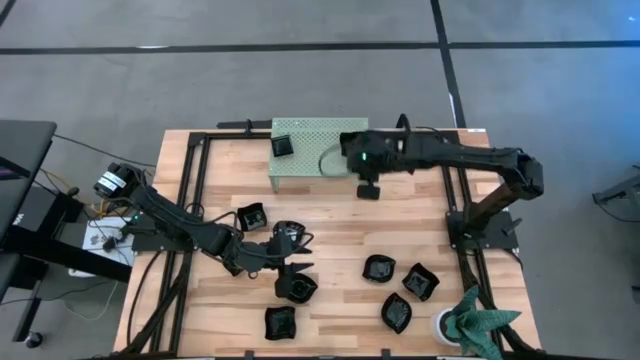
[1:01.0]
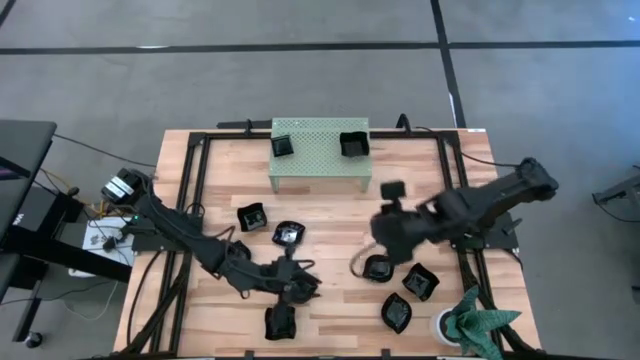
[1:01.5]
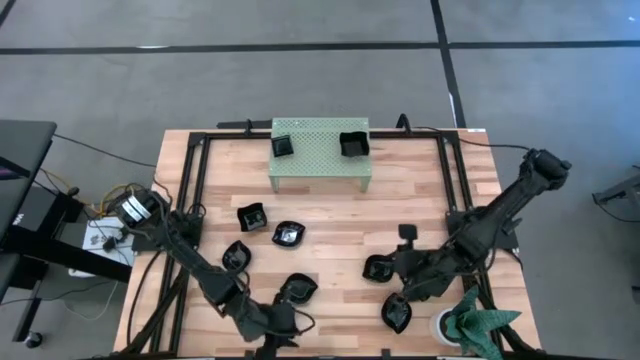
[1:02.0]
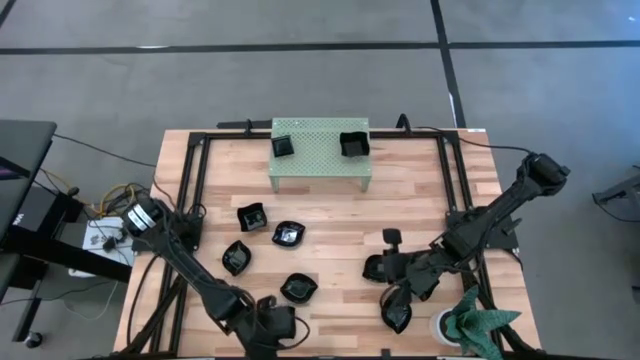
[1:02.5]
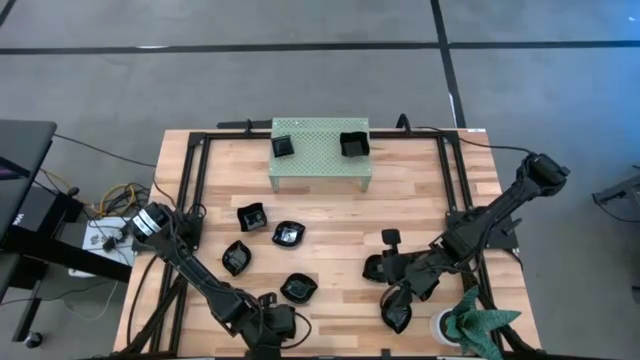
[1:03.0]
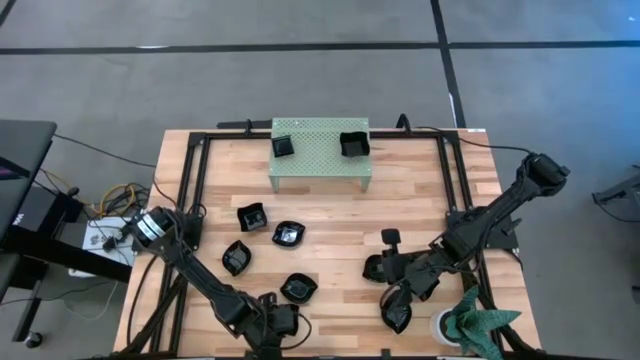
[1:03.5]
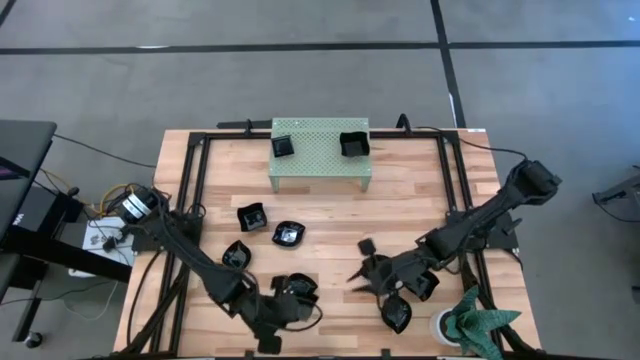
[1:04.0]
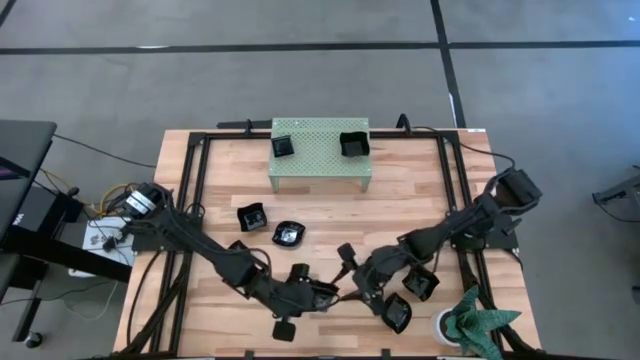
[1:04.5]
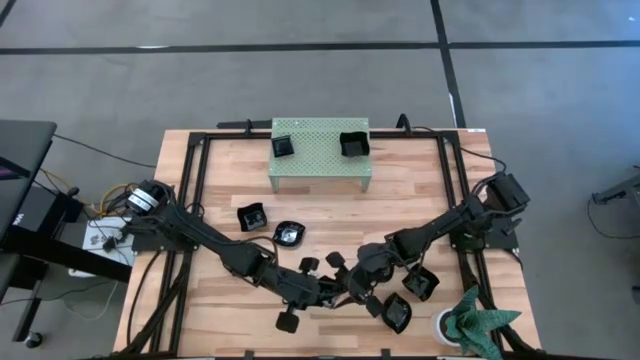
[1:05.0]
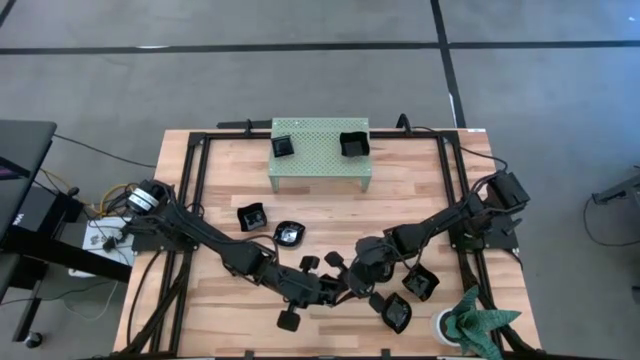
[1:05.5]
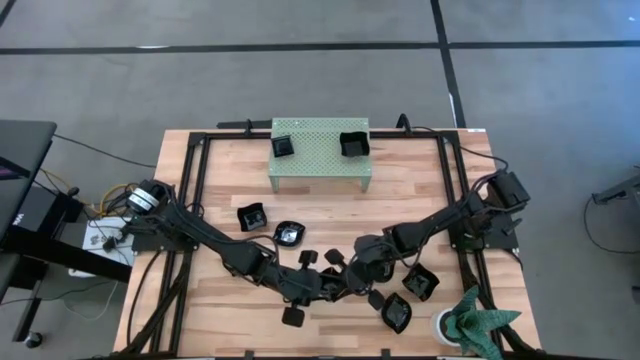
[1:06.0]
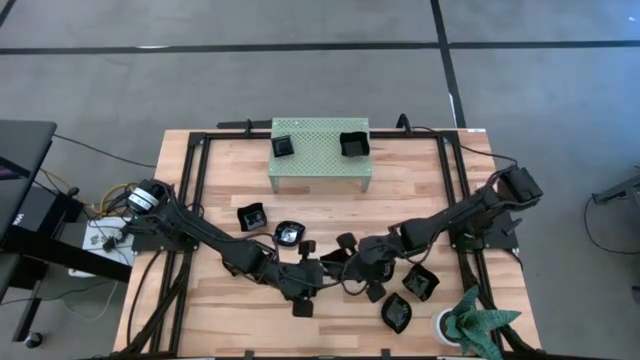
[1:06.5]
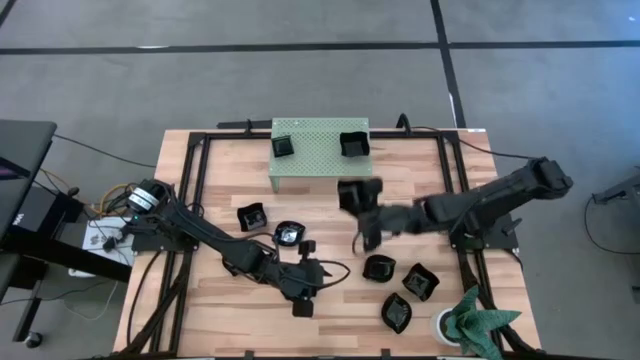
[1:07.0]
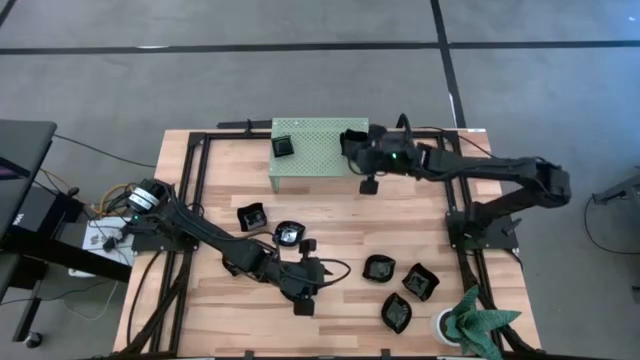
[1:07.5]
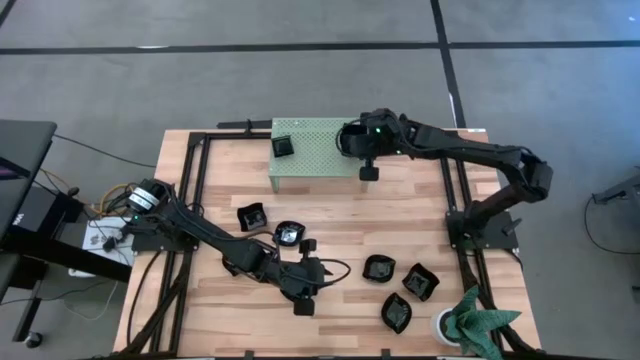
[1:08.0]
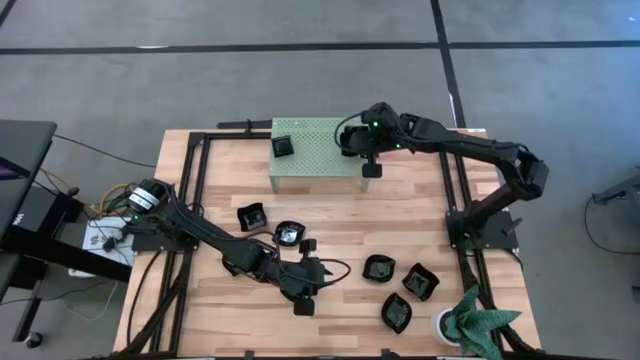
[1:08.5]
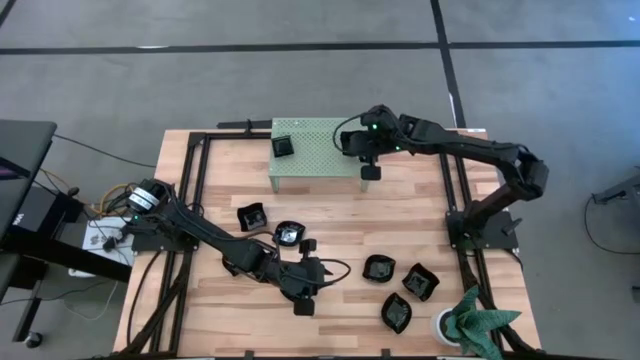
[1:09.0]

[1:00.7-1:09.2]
Task: Pick & Place Mini shaped plates
Stack the black distorted square plate on top of the black distorted square plate on the shelf

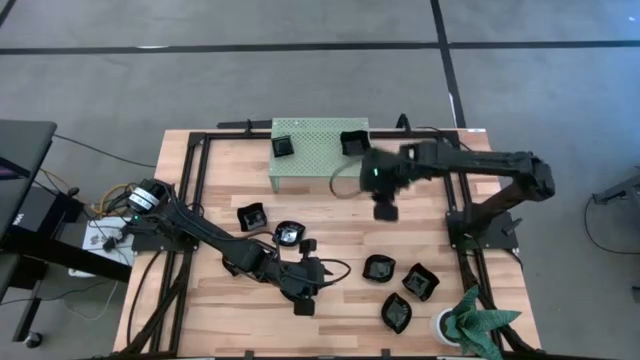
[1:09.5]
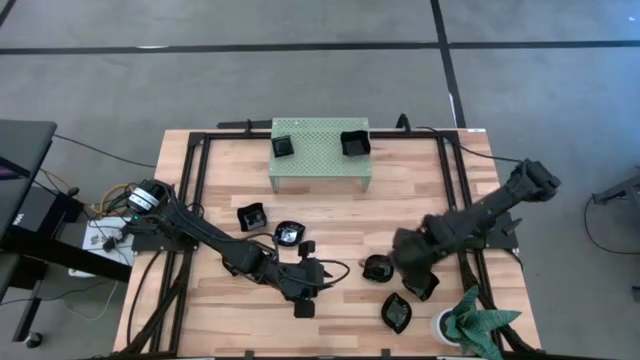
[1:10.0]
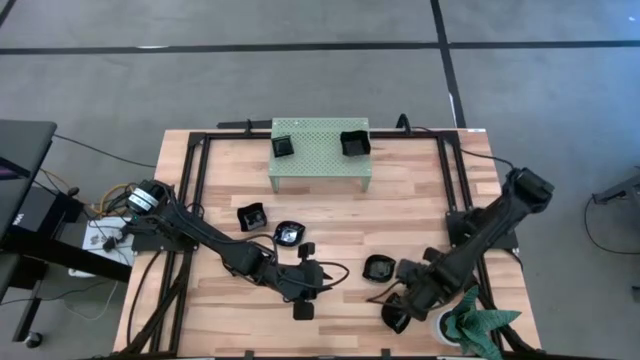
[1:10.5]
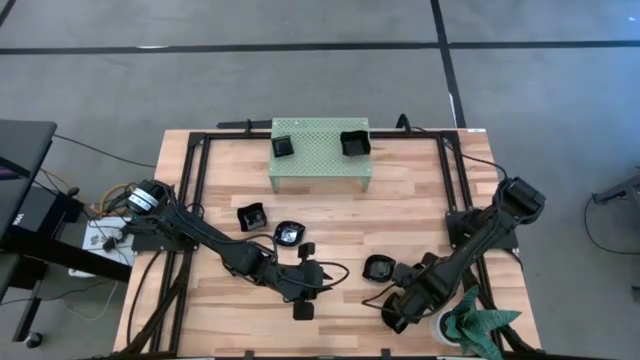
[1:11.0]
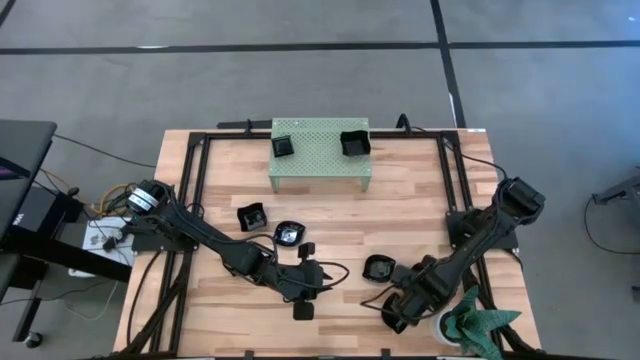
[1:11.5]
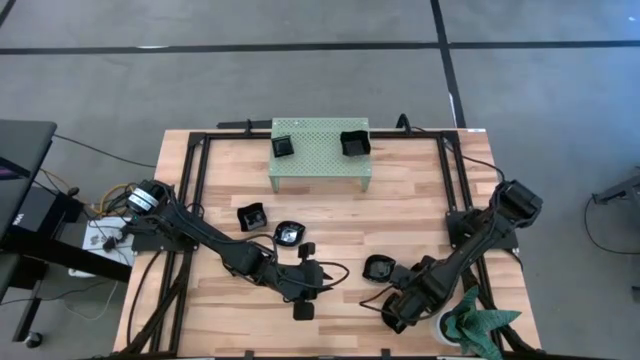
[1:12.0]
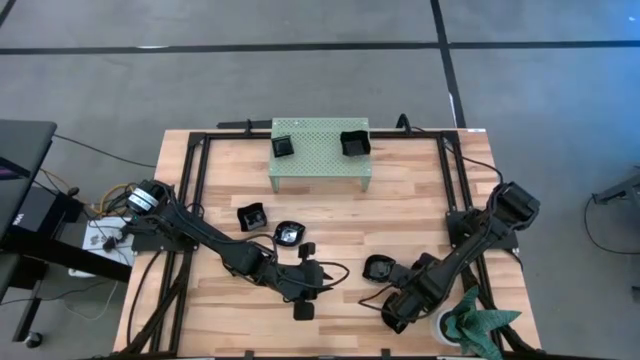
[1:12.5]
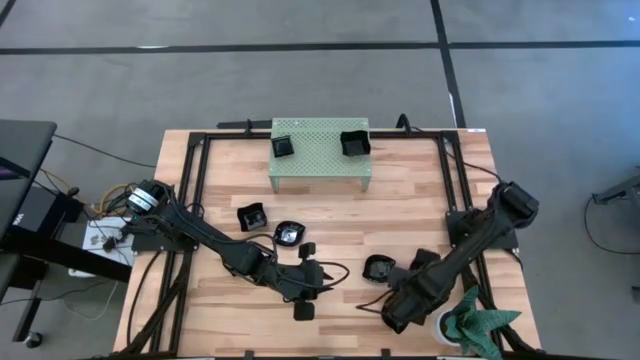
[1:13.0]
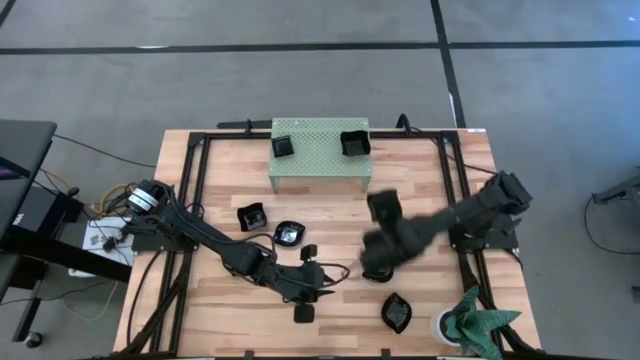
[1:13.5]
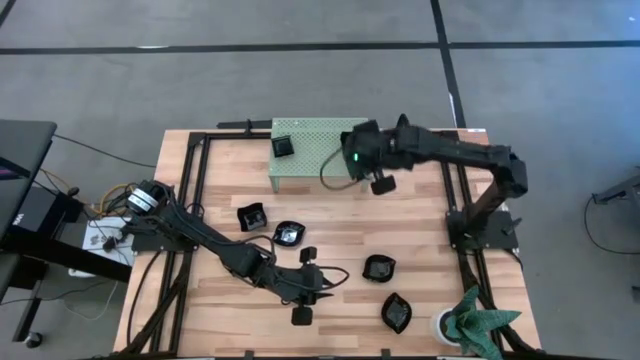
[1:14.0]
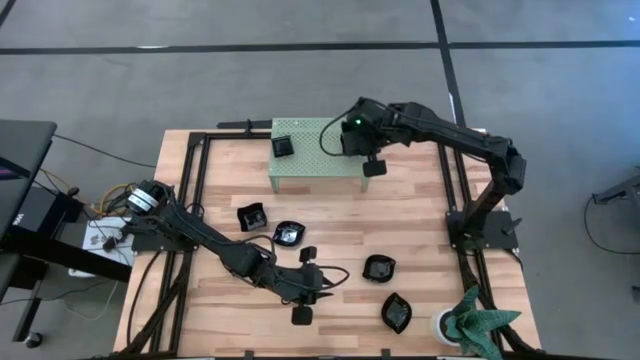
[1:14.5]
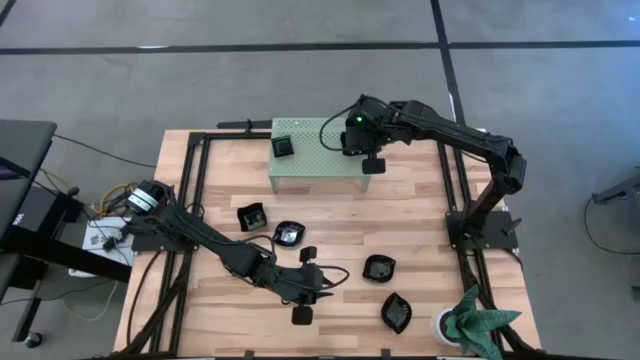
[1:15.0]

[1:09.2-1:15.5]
Stack the black distorted square plate on top of the black distorted square plate on the shelf

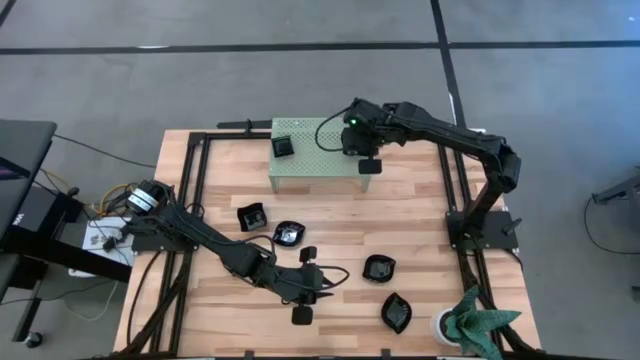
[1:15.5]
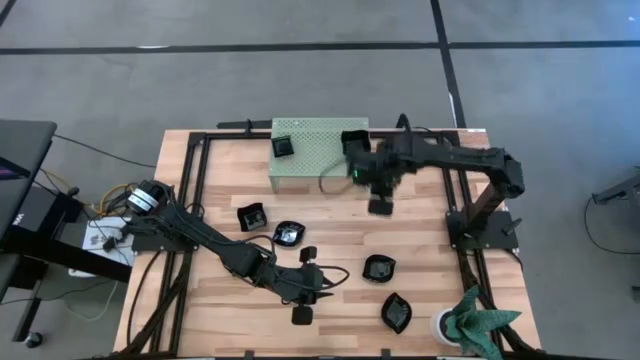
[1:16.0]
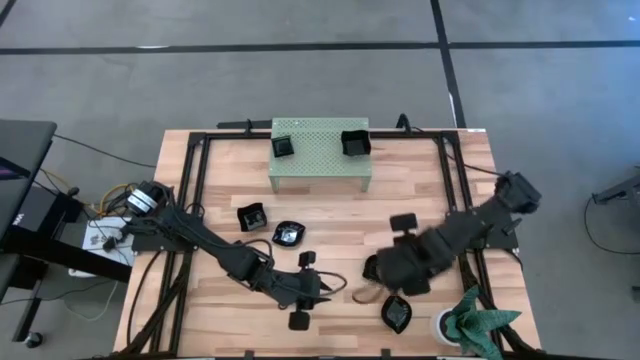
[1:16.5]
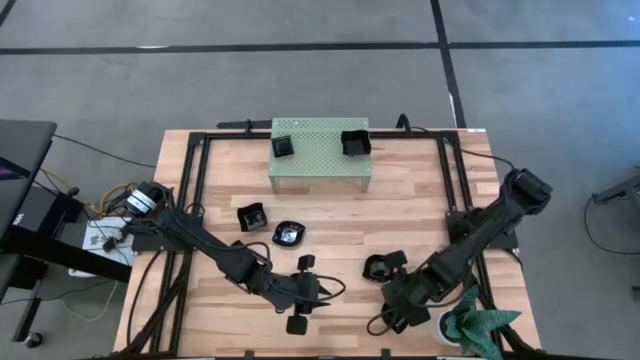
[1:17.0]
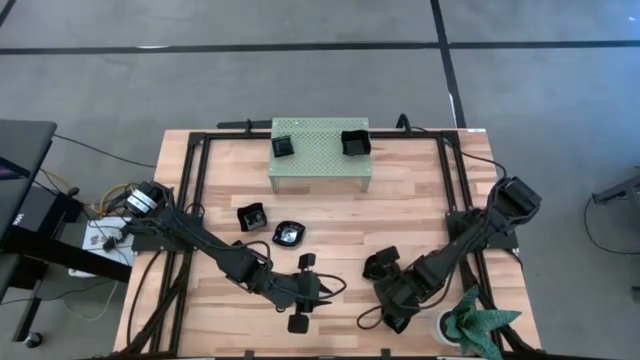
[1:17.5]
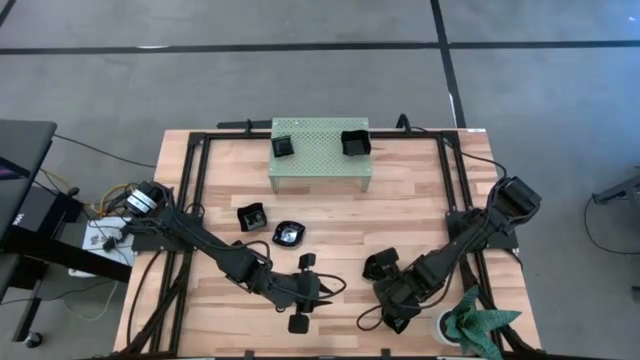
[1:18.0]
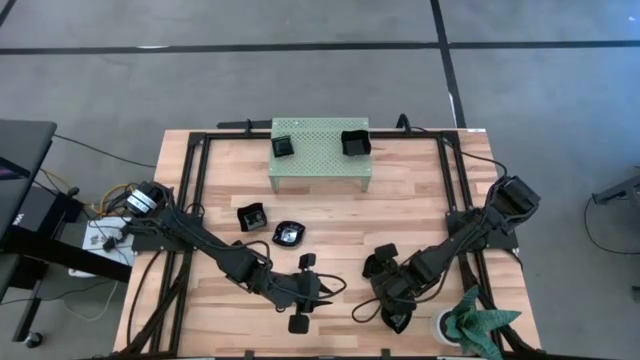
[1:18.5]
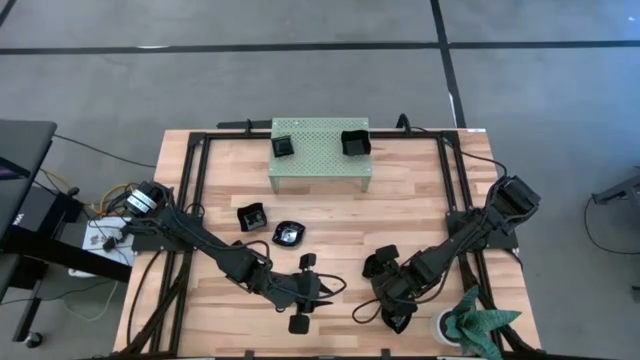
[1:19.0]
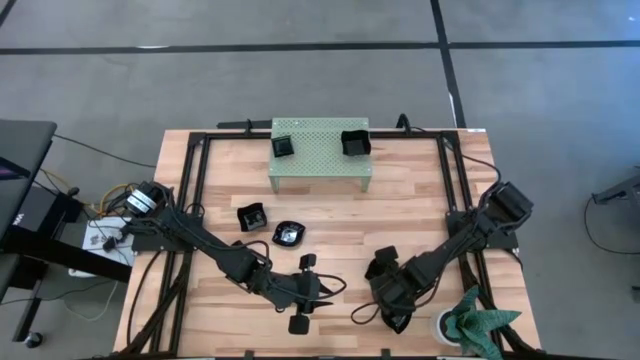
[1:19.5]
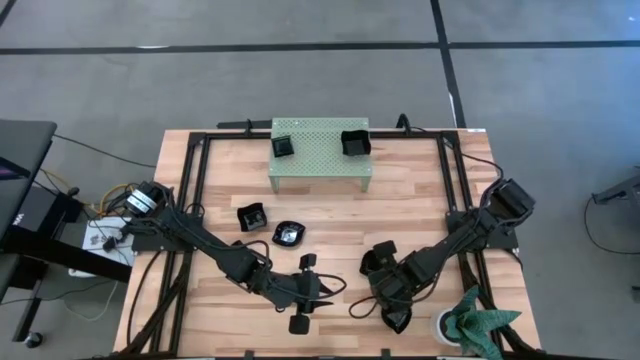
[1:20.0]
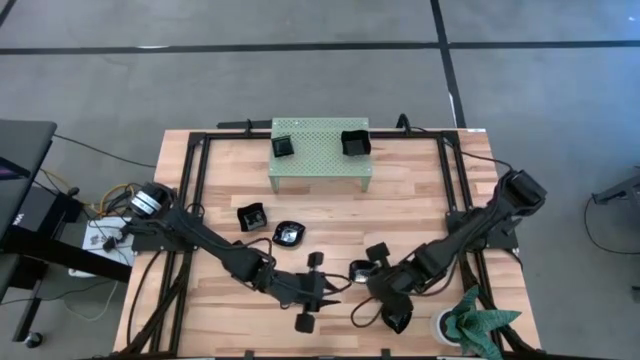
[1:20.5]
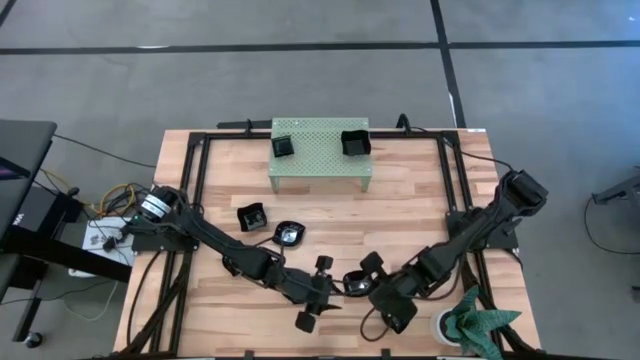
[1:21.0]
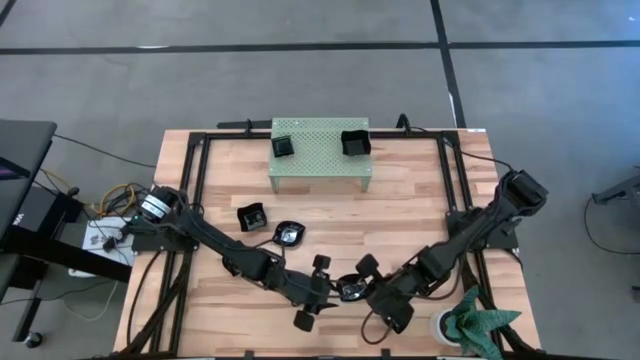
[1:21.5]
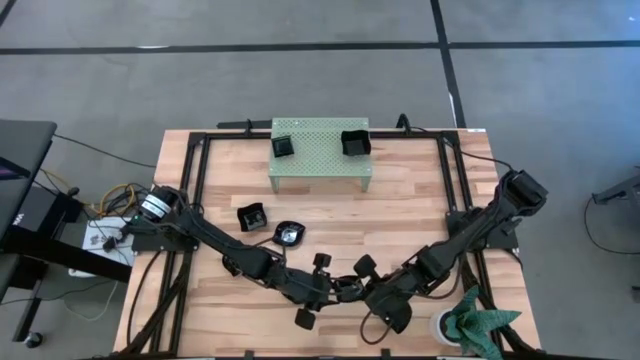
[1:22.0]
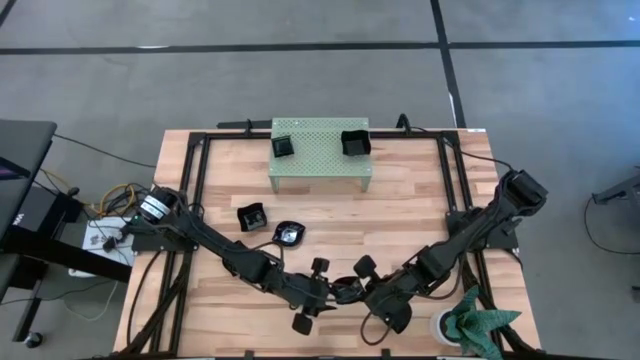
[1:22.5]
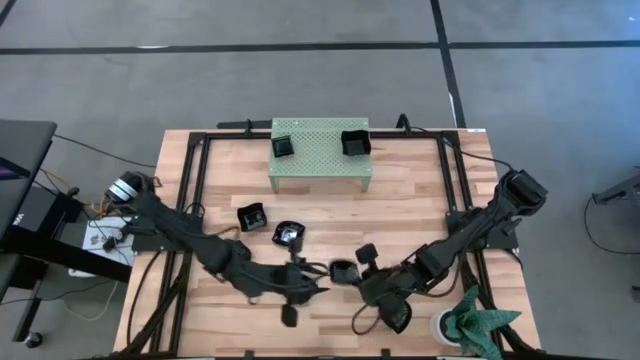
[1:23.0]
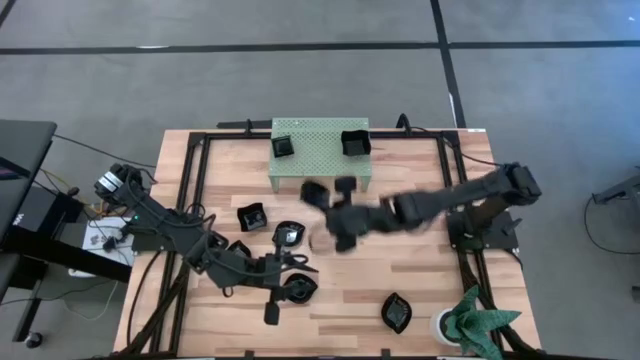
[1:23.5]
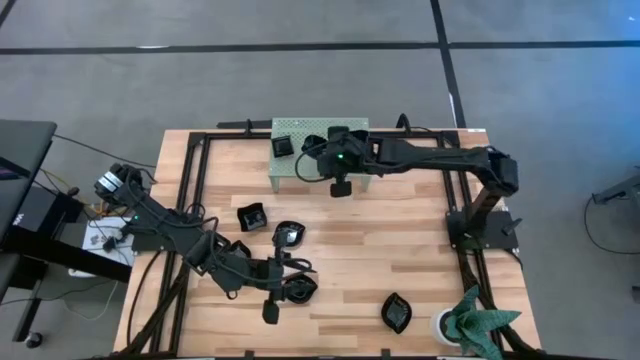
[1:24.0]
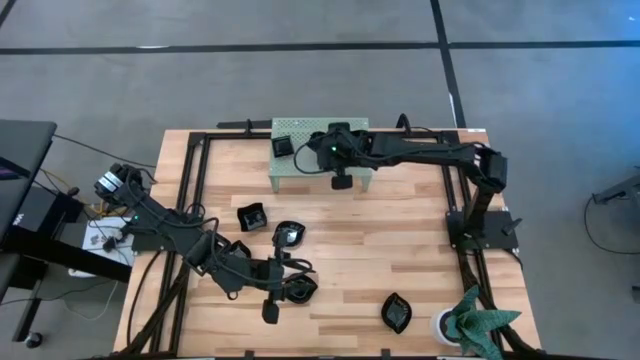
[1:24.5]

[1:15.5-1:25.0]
Put the black leaf shape plate on the shelf
